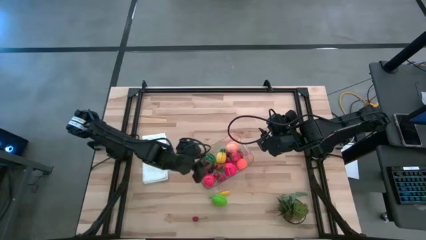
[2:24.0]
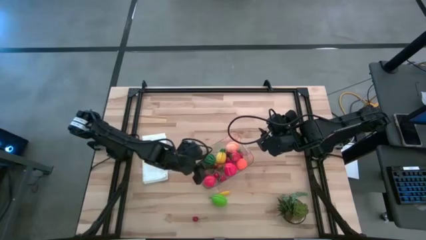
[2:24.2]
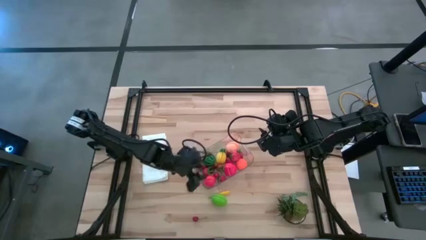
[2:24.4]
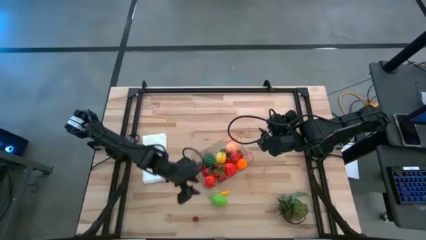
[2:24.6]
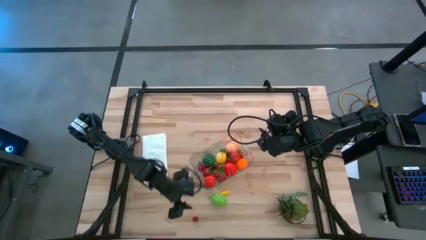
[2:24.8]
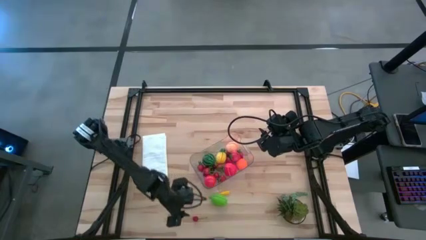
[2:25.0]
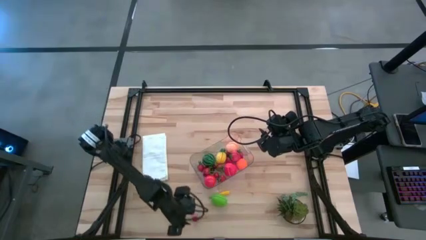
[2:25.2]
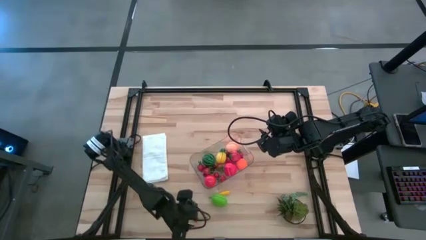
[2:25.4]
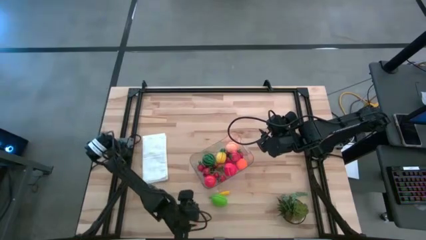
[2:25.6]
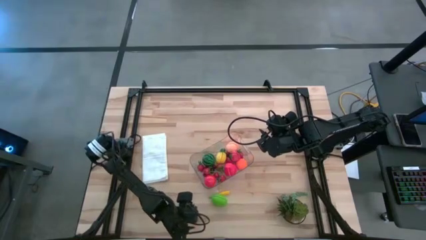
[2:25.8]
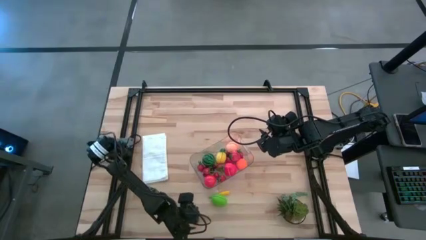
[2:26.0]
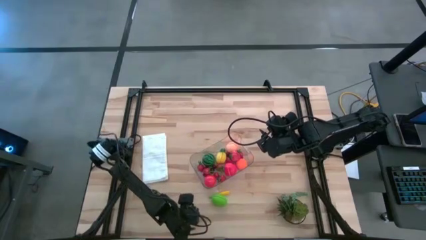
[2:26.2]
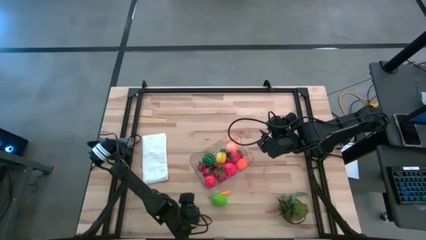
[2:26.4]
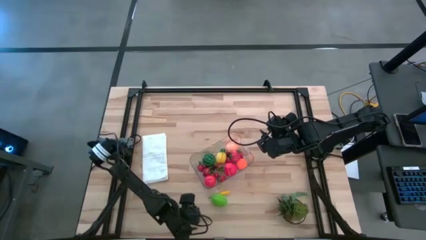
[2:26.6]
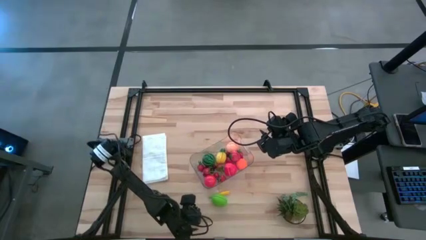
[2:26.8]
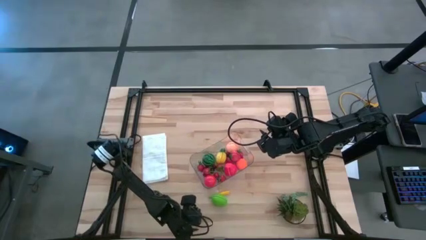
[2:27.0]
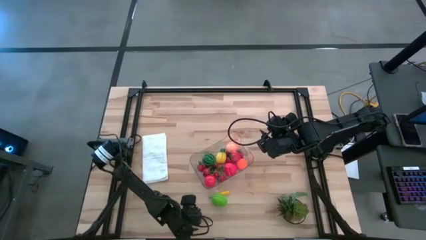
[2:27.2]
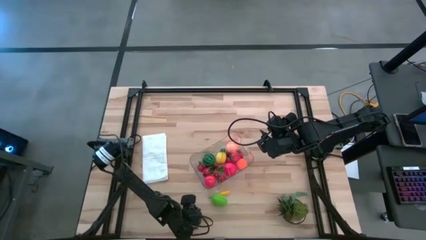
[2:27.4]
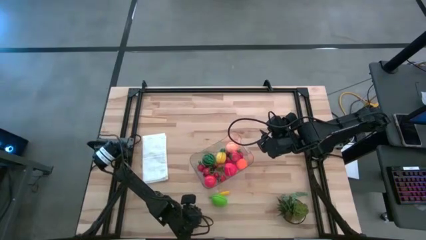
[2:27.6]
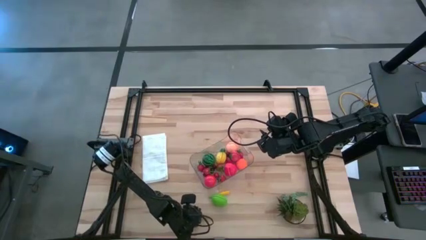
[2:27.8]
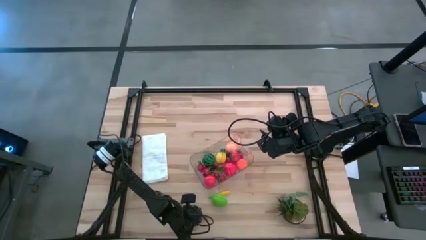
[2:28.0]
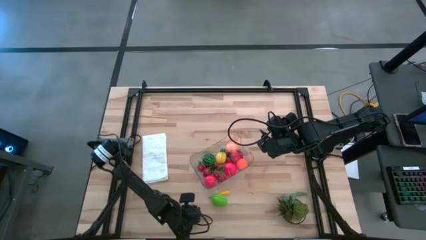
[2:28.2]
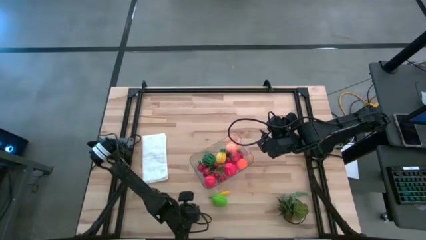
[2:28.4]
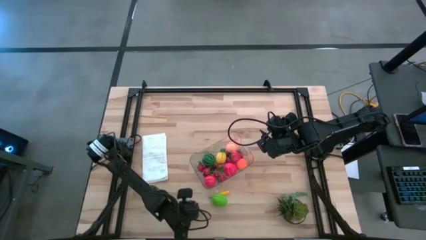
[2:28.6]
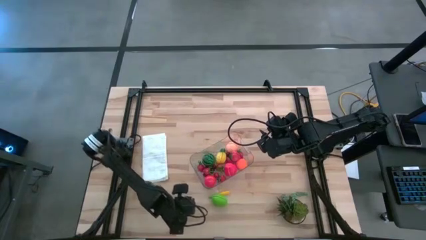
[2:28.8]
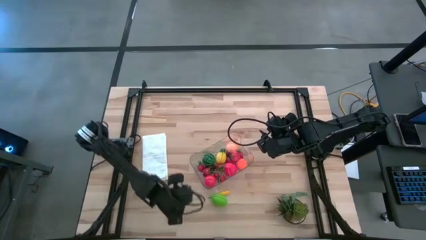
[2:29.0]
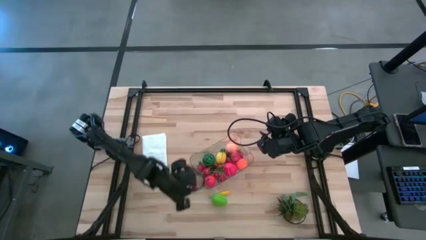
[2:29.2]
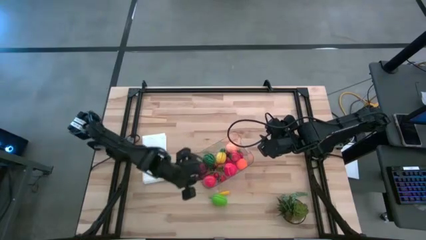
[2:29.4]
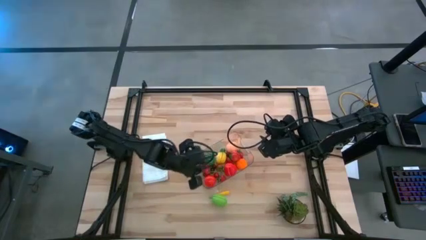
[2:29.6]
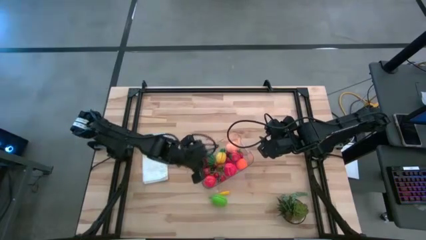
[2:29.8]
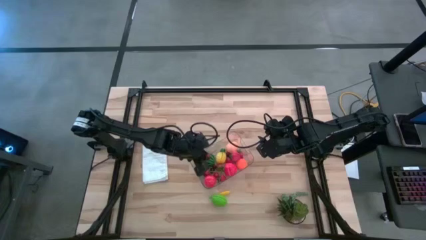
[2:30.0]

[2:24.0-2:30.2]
Task: Pick and placing Produce into tupperware
Put the dark red cherry into the transparent bin

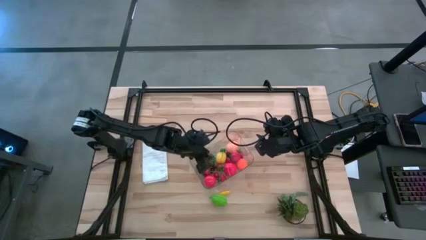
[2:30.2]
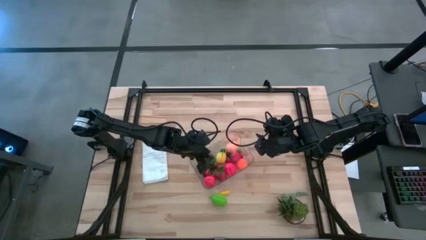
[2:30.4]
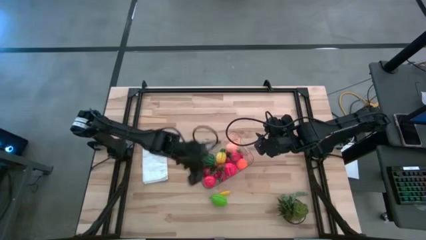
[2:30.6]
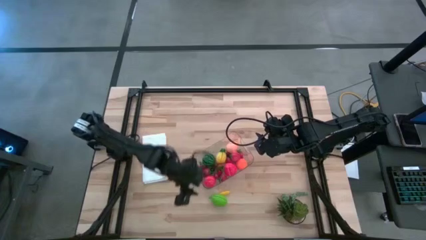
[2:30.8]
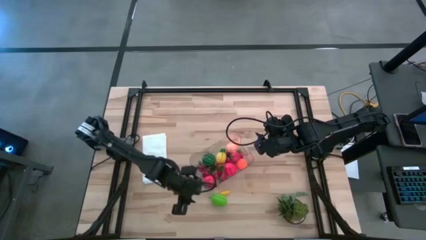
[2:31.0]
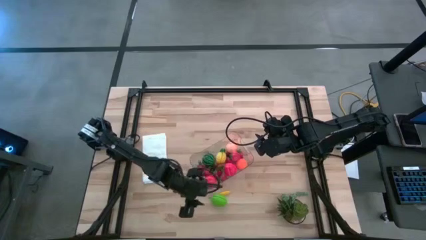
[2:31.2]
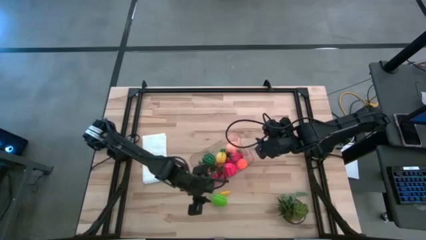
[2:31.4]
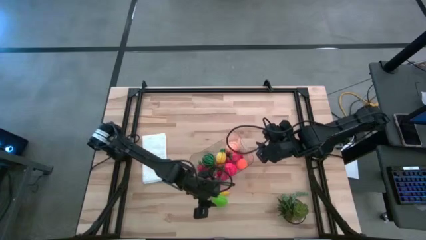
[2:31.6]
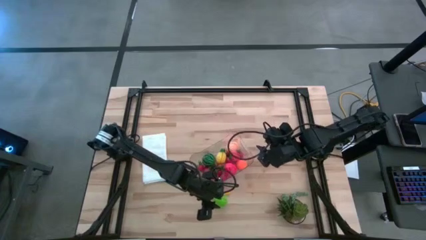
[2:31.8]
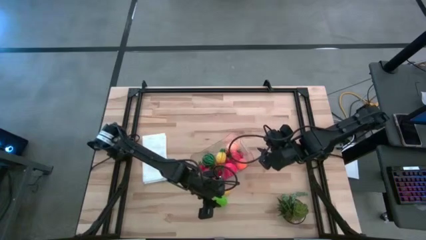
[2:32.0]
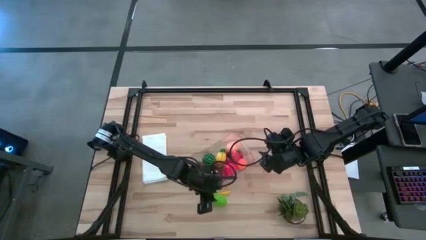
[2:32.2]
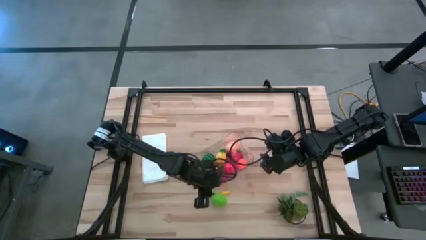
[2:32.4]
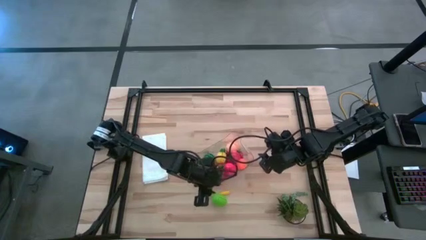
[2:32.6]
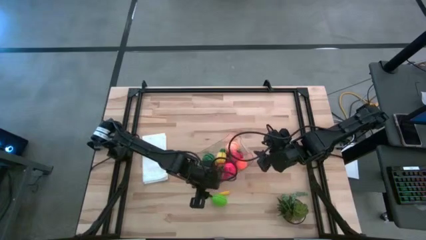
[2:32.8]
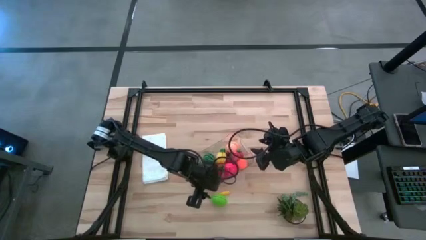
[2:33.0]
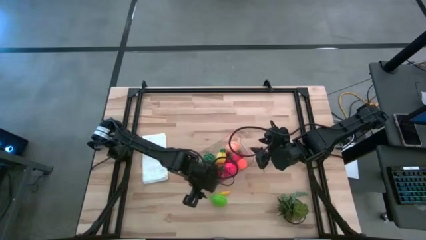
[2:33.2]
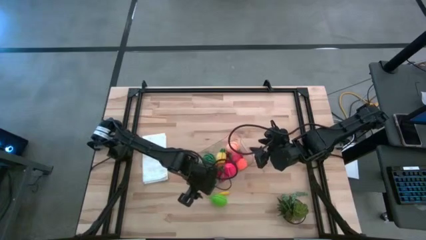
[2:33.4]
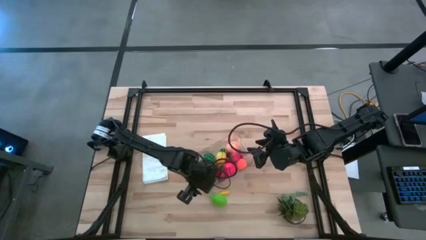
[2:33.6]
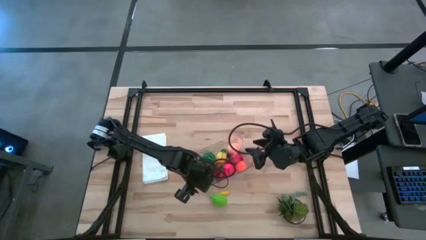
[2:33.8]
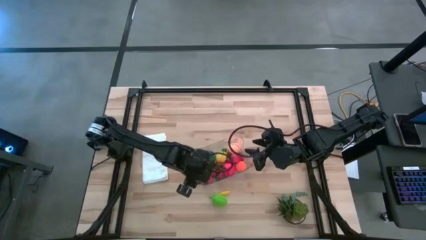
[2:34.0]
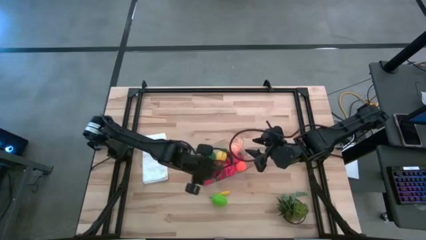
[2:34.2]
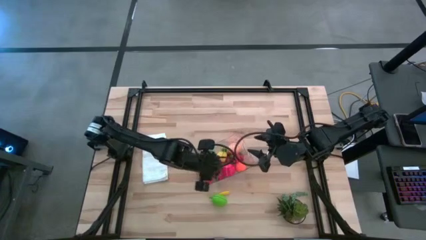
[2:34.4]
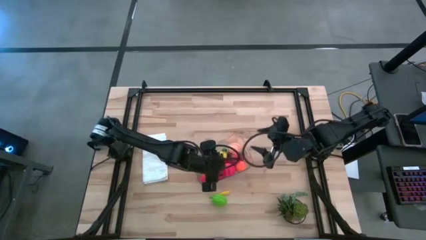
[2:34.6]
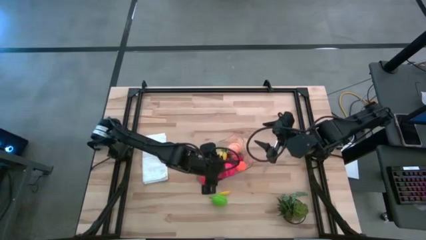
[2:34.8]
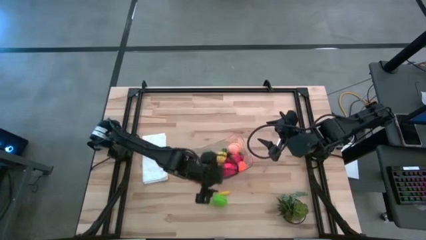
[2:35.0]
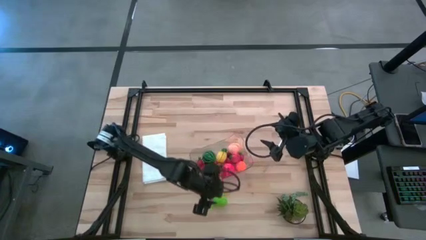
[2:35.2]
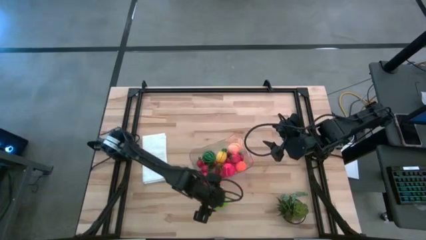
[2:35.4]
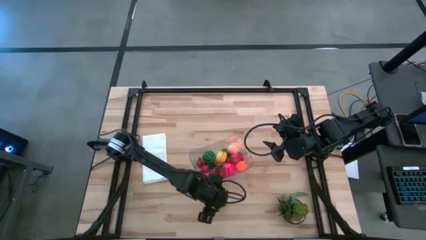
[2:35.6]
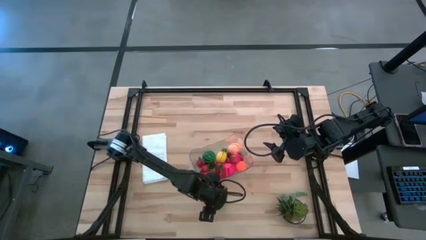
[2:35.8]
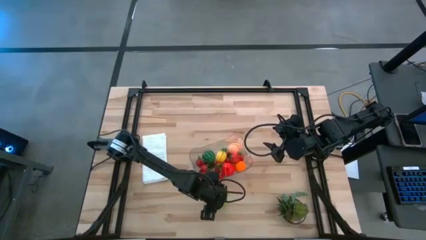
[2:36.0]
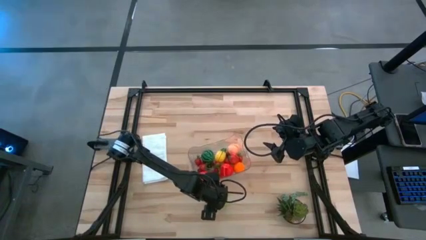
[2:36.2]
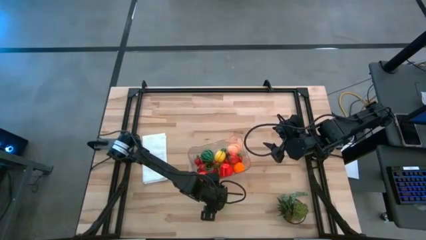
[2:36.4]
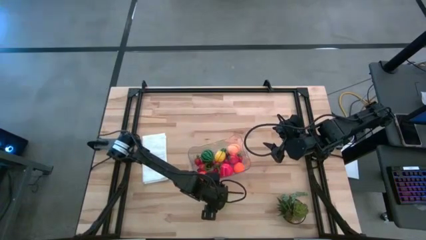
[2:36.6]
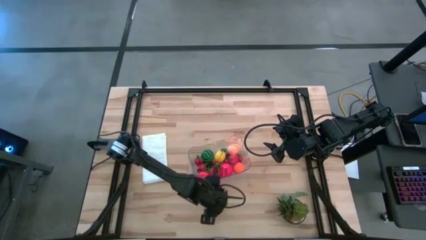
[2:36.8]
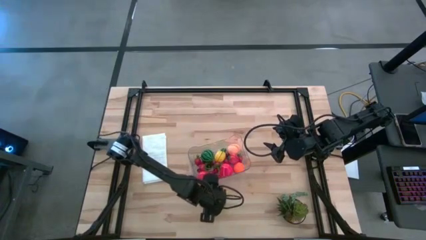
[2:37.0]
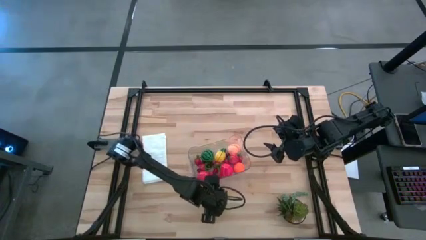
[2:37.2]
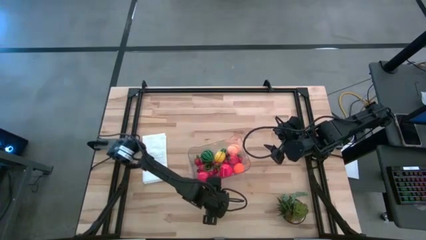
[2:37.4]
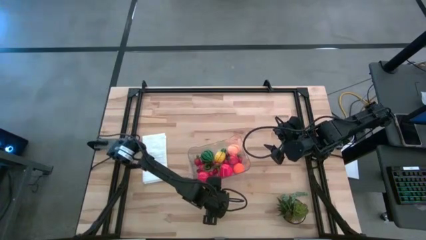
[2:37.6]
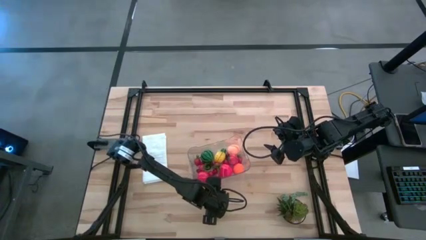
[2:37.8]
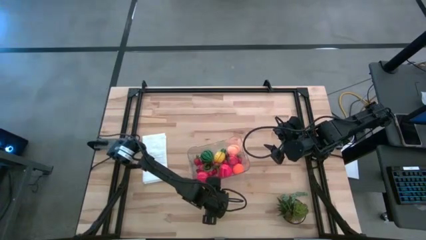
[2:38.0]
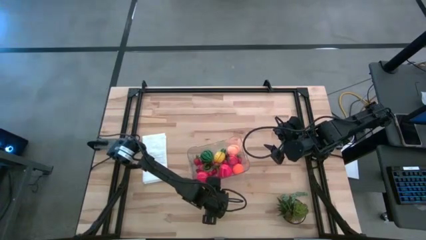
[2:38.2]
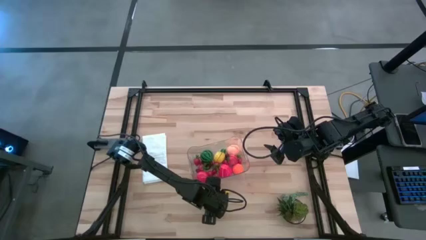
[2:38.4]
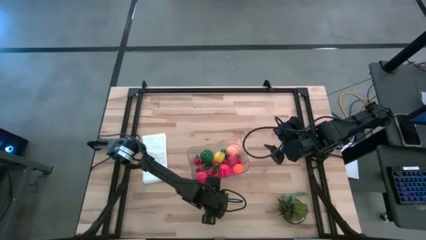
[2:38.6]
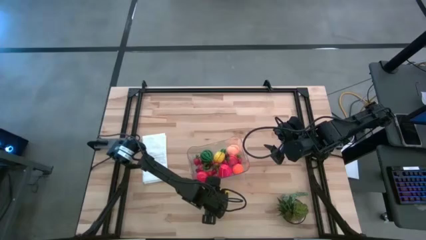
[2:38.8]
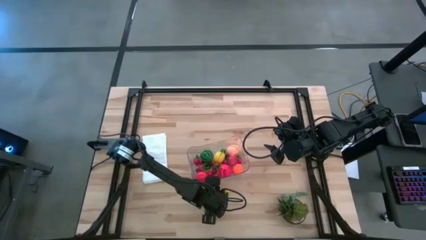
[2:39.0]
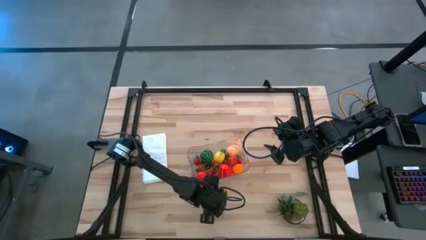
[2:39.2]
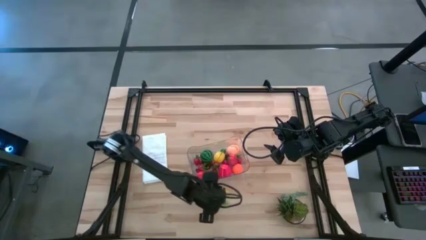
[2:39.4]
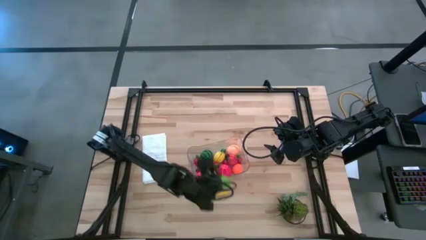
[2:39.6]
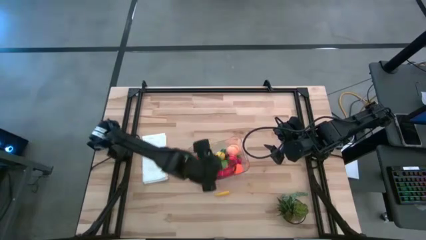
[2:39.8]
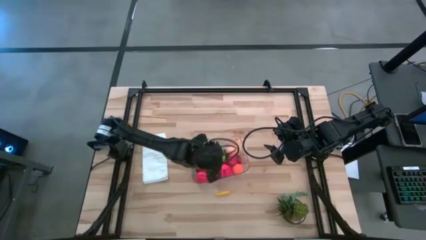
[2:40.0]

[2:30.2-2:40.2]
Put the melon into the transparent bin
